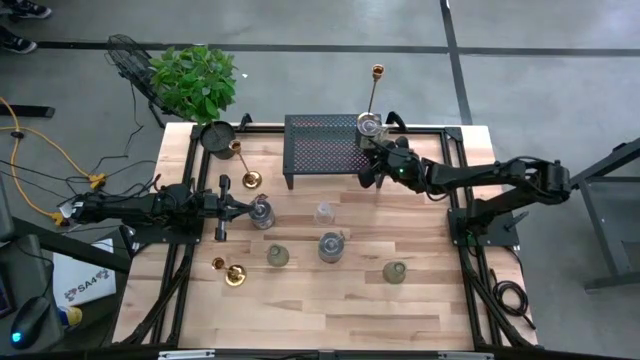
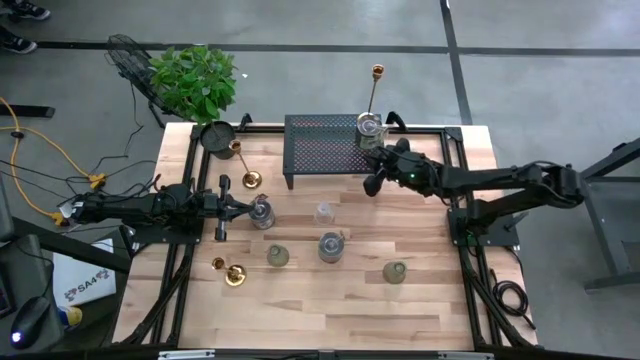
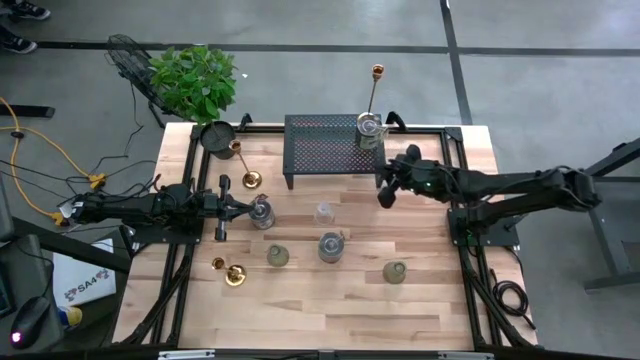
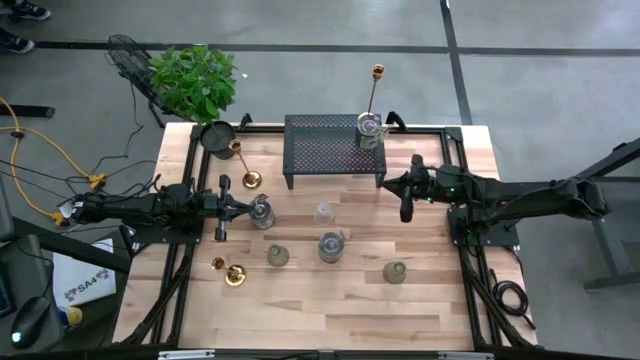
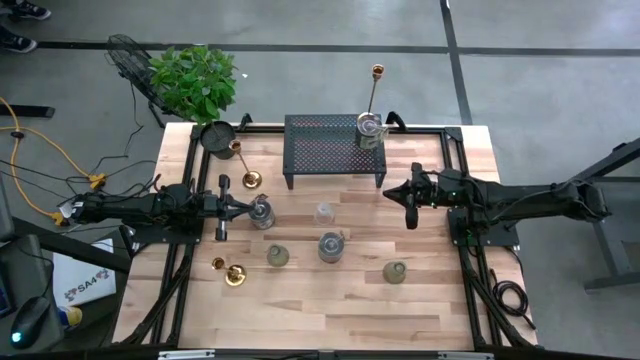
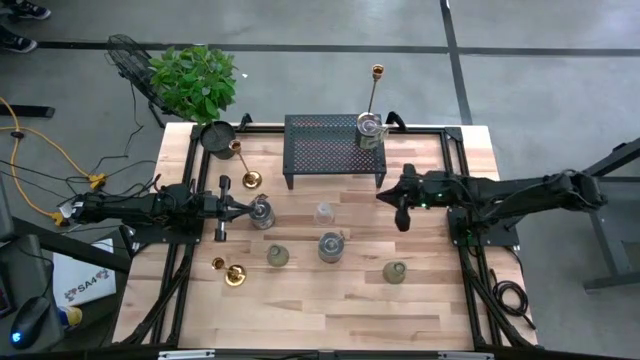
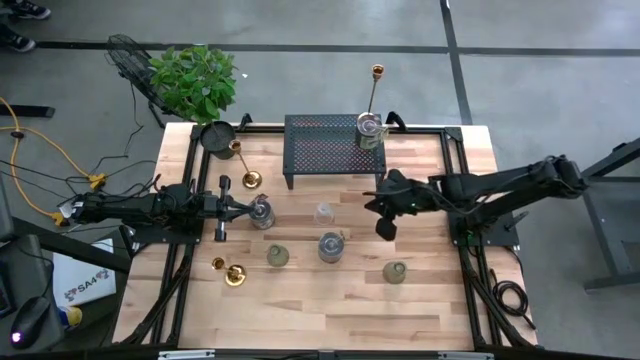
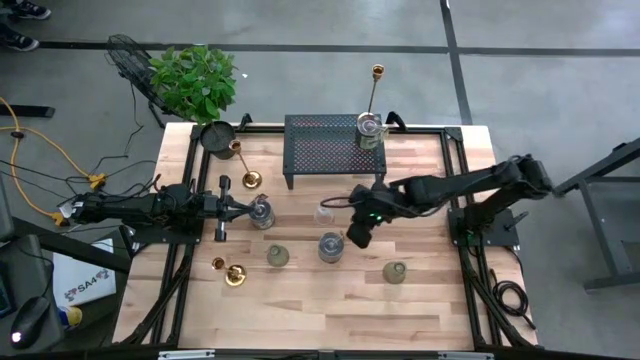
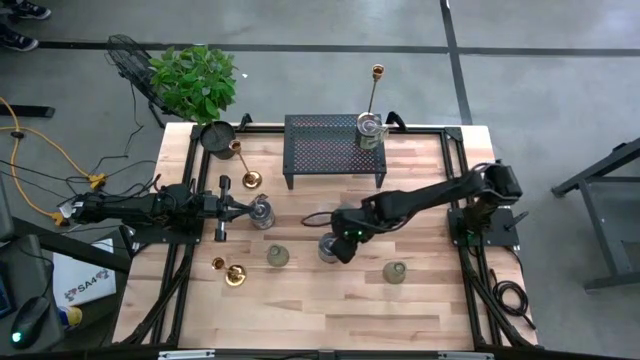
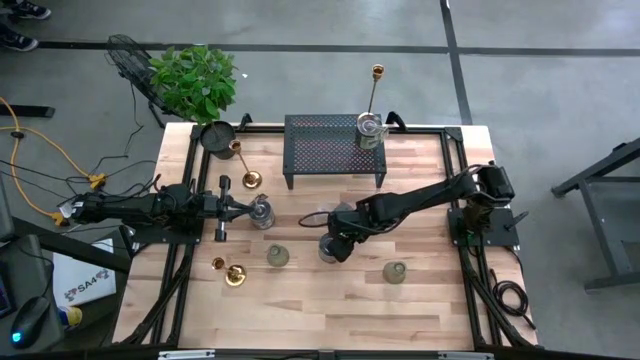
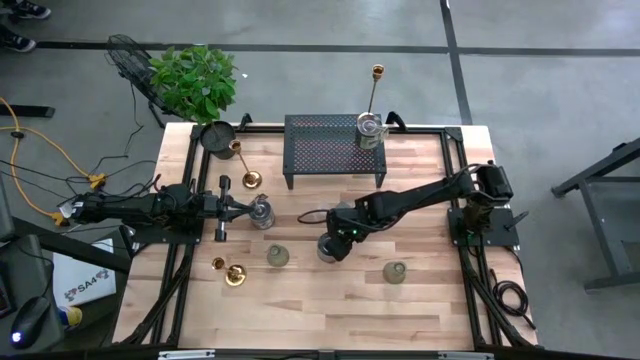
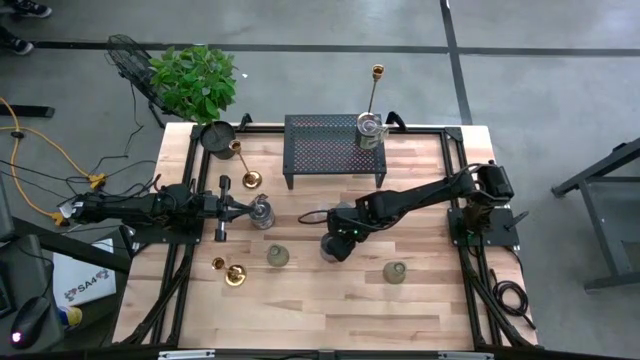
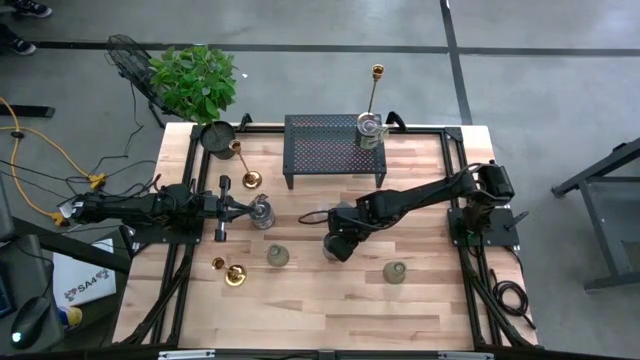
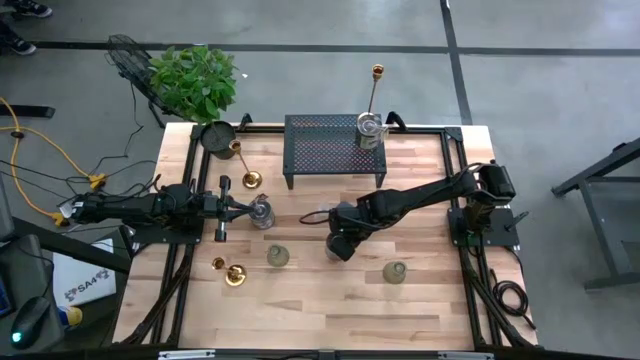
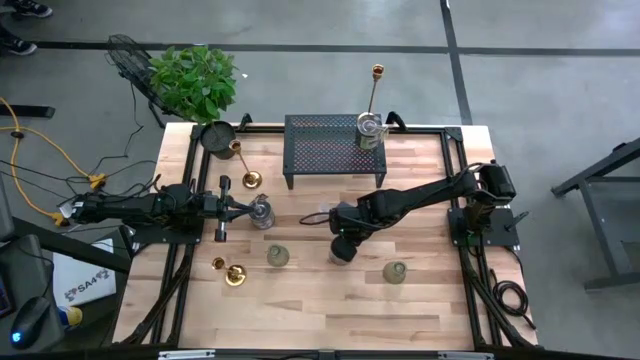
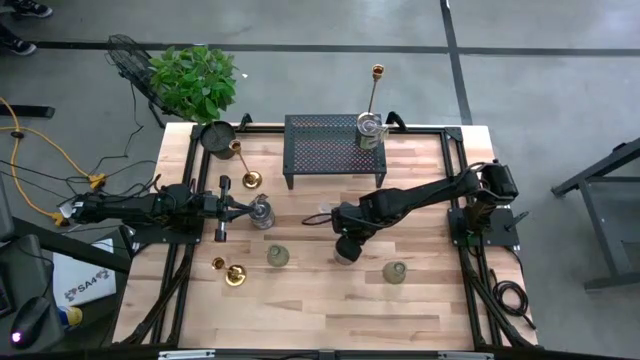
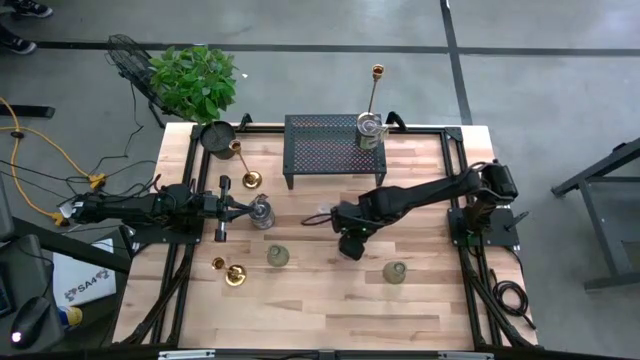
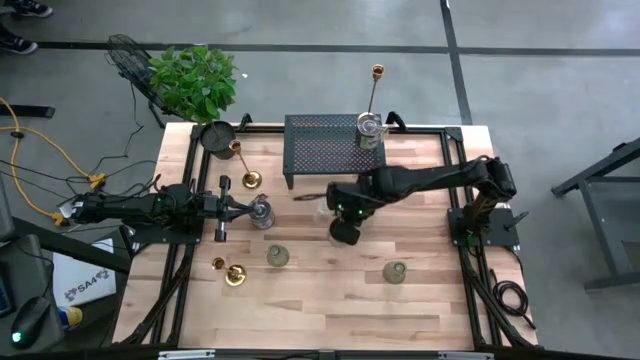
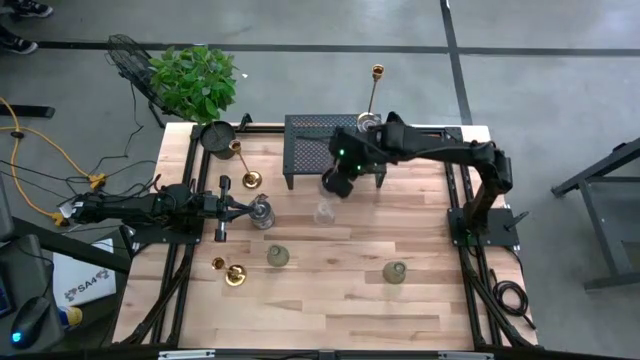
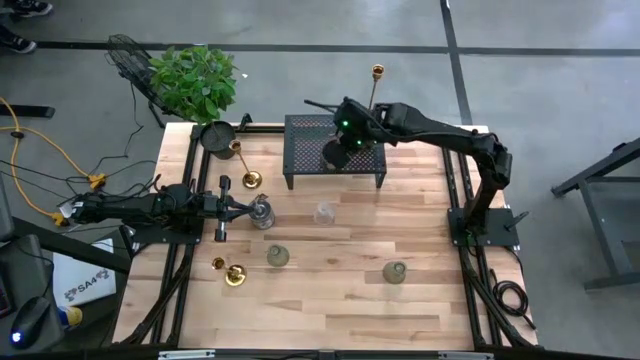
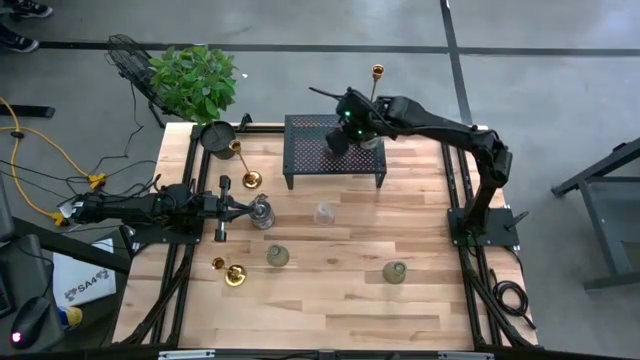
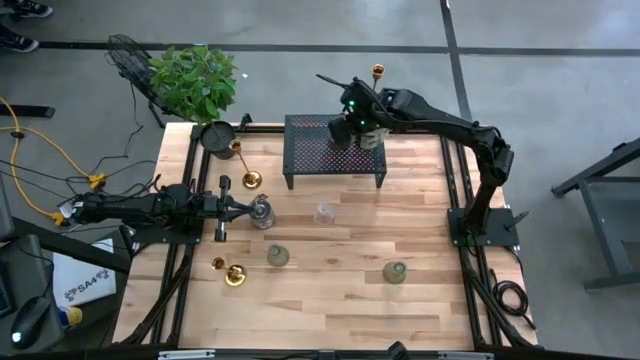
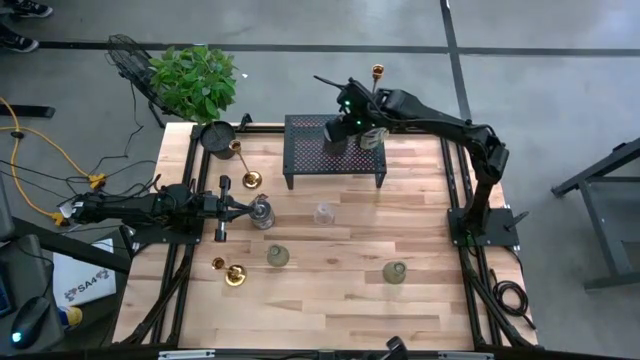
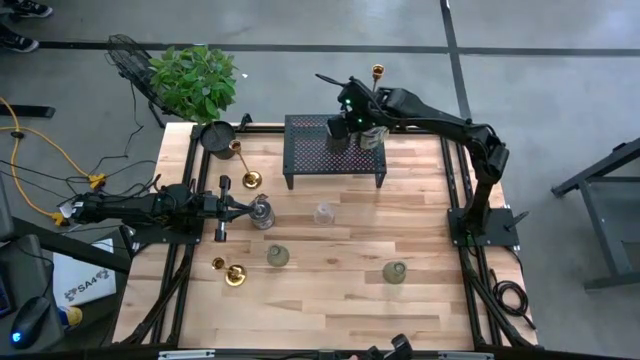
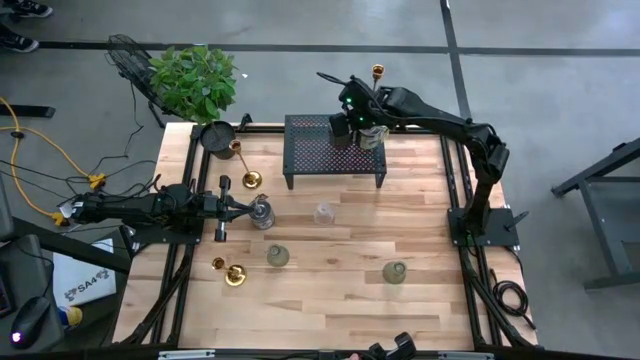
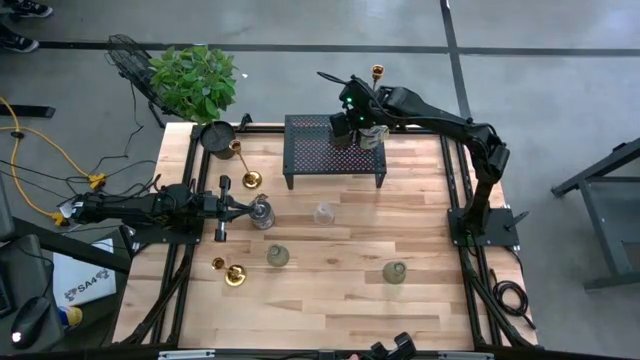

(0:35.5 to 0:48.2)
Task: Pick & Place candle stick holders
Put the bottom silver scented candle on the shelf aligned with the other silver scented candle on the shelf

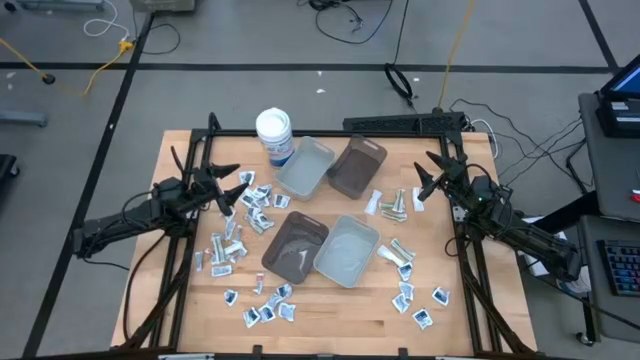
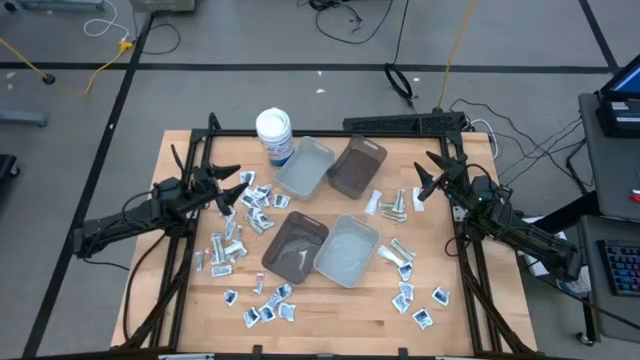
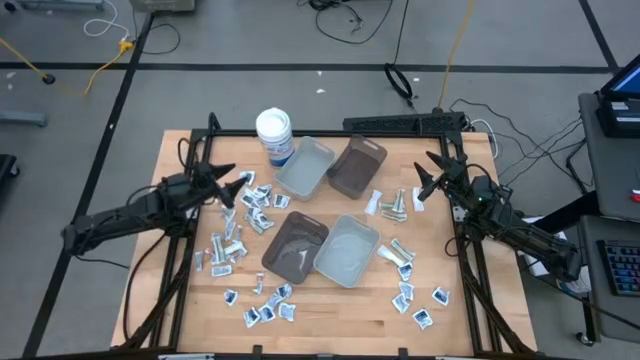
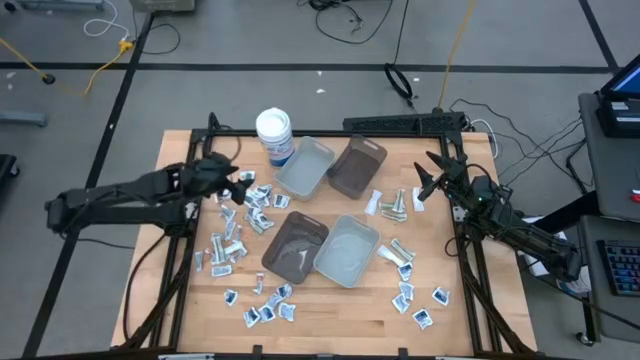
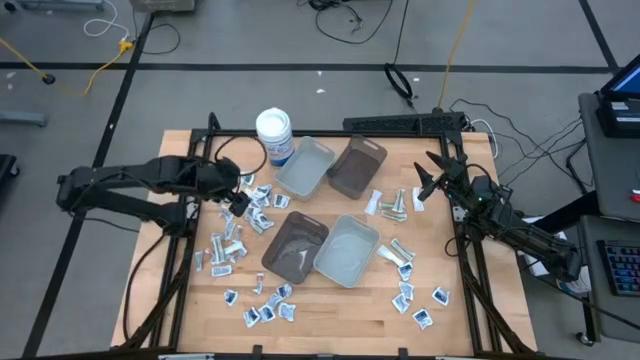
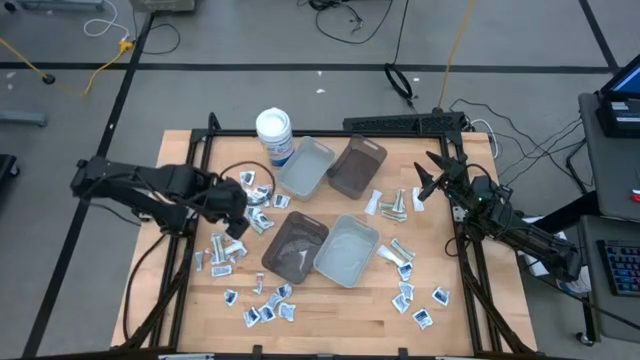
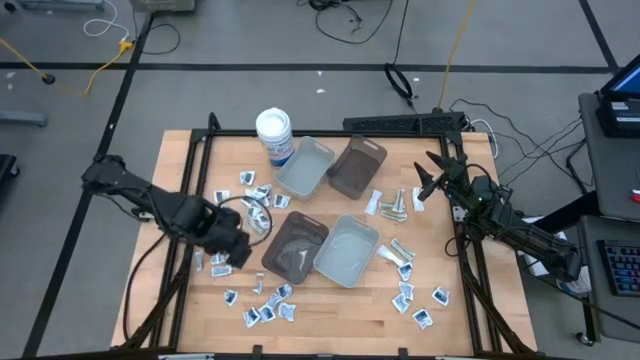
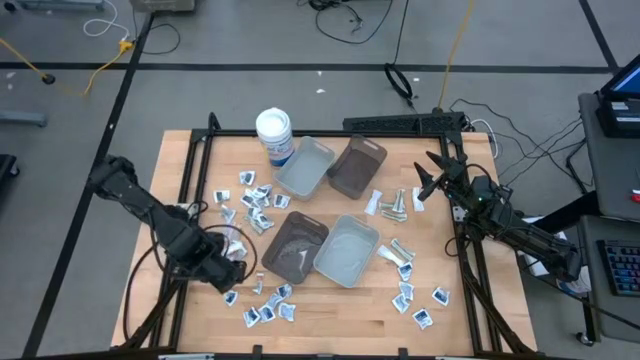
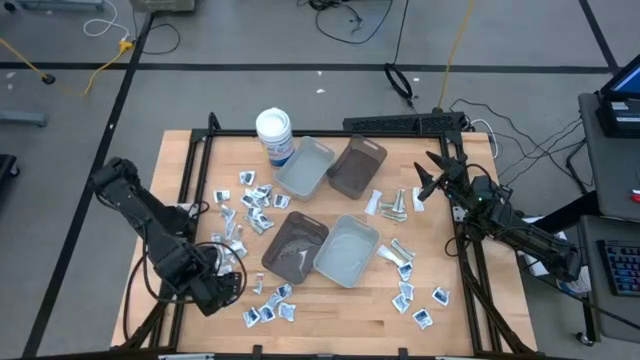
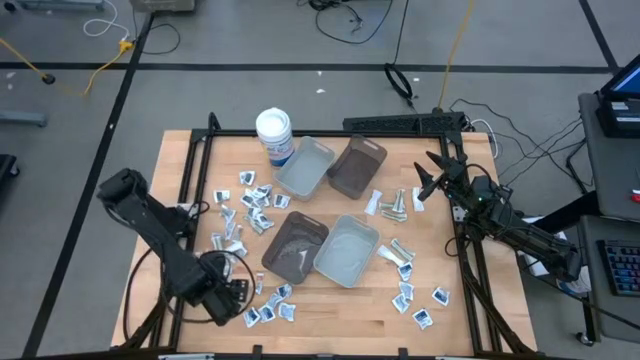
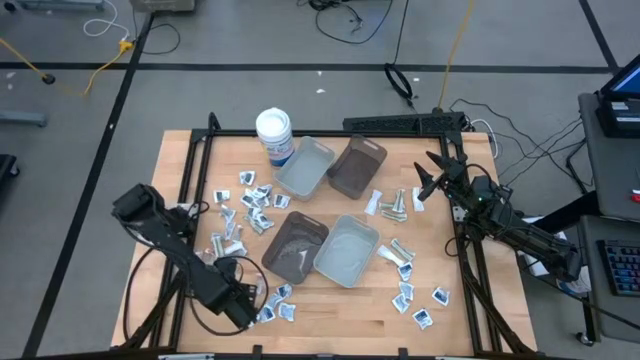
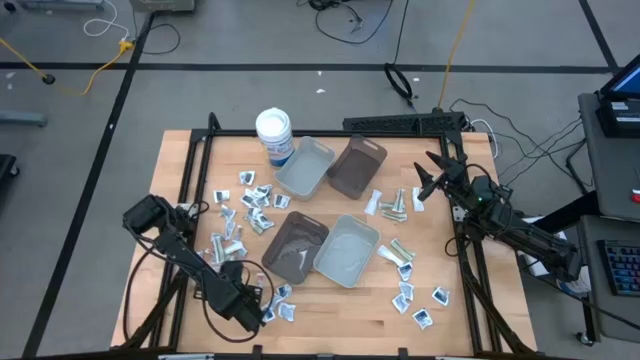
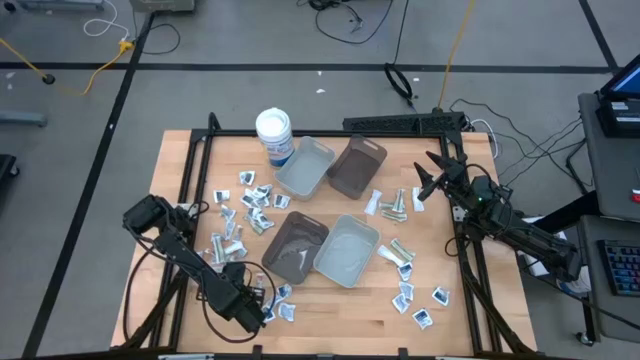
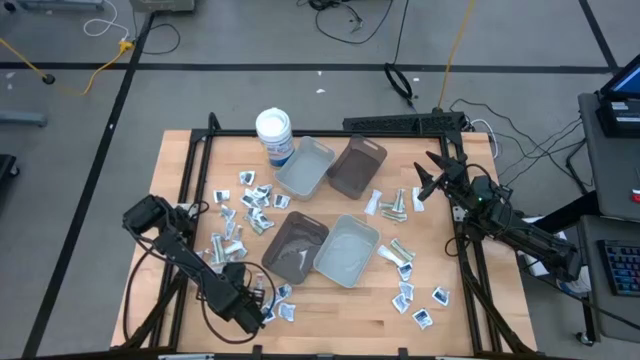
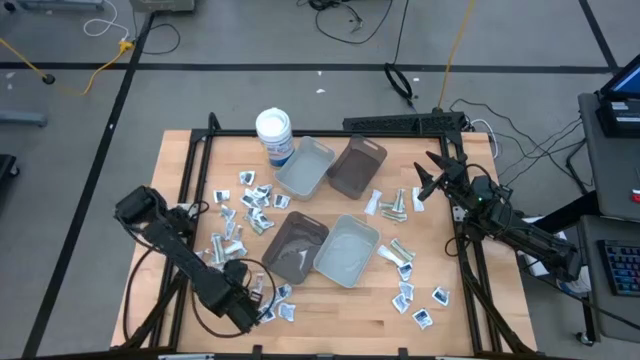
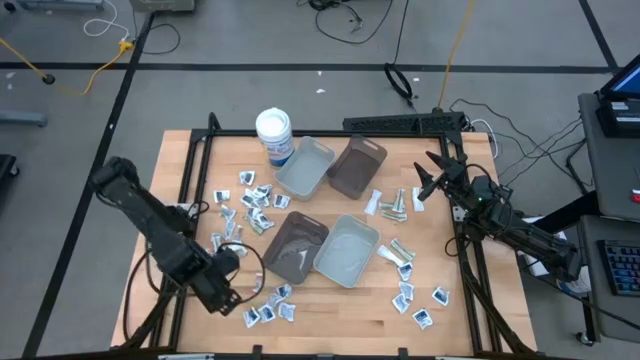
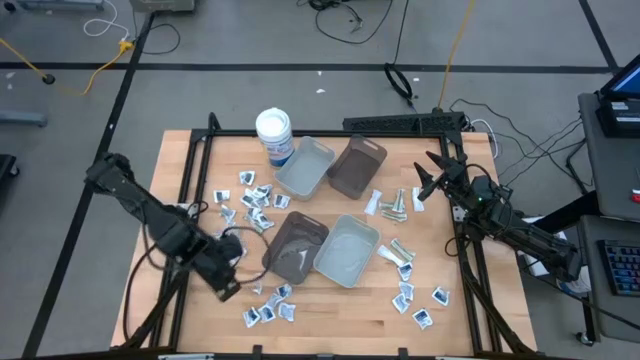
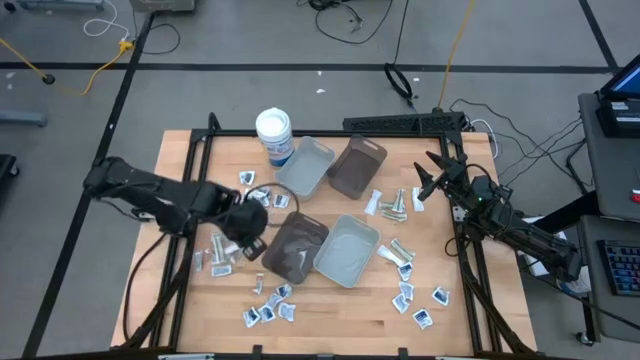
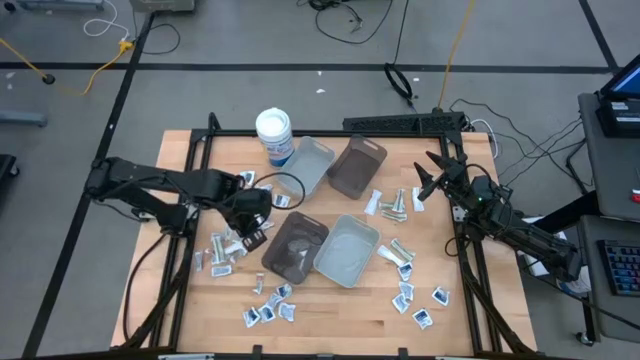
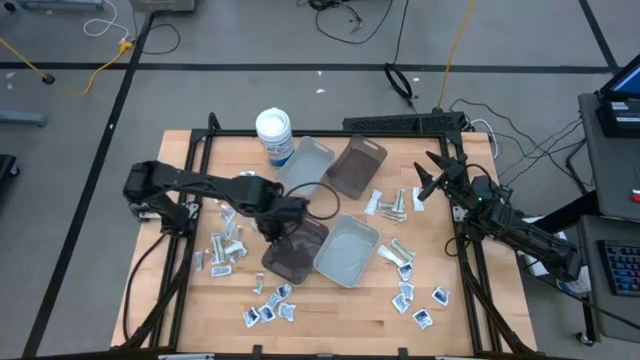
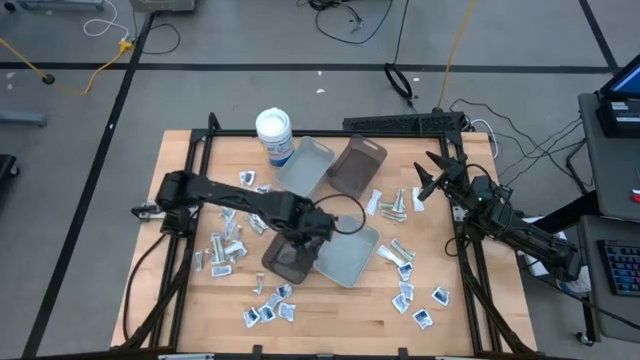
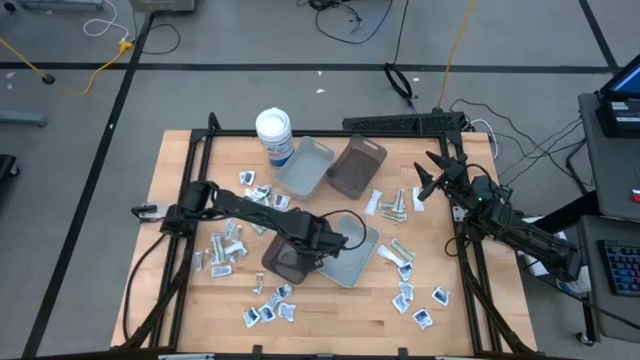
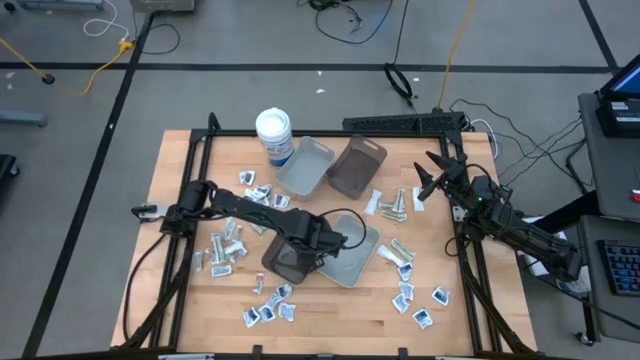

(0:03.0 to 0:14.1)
Task: Pick & Place First Aid Supplies
Put the blue alcohol pad into the bottom black bin
